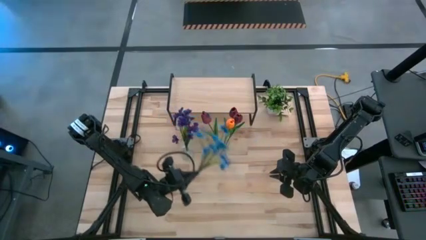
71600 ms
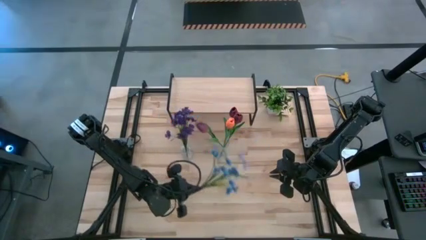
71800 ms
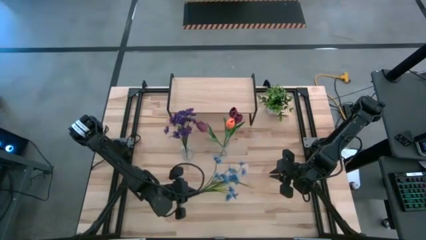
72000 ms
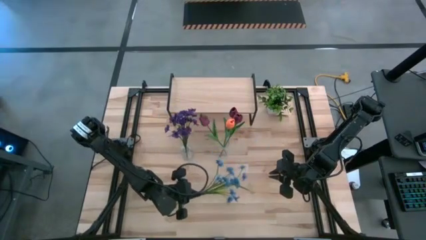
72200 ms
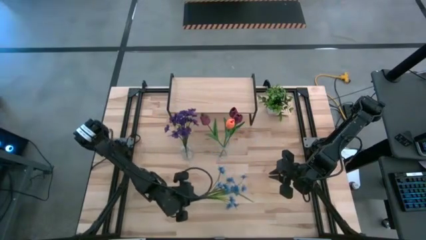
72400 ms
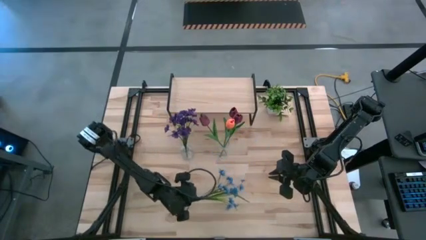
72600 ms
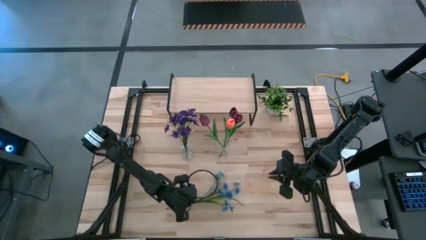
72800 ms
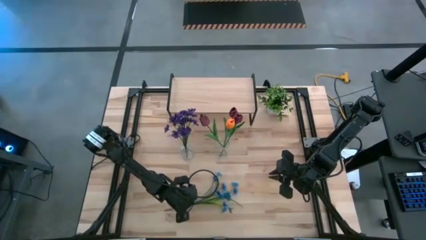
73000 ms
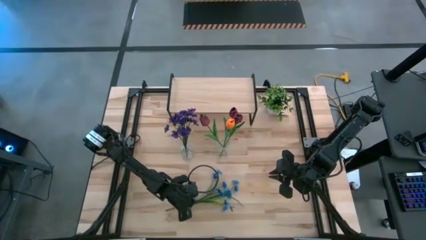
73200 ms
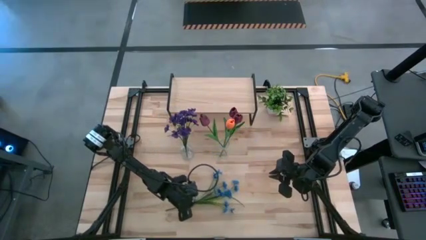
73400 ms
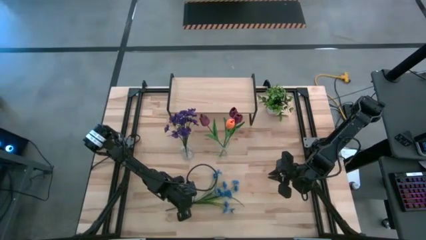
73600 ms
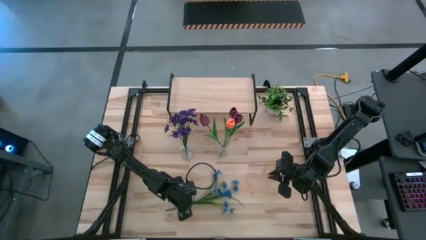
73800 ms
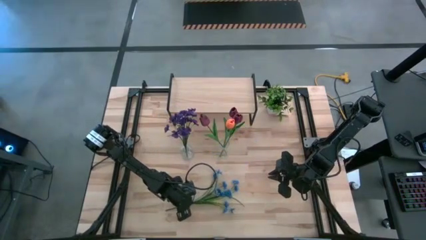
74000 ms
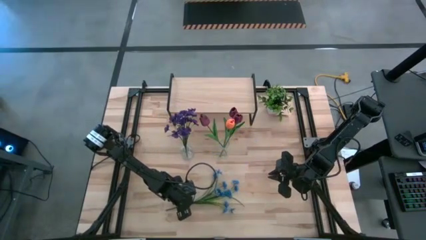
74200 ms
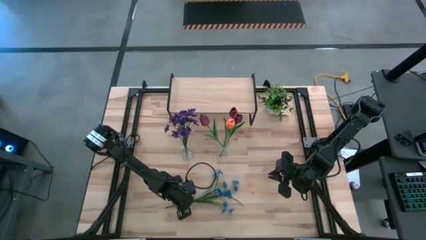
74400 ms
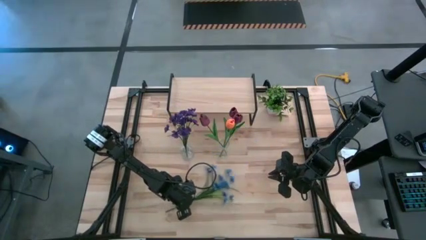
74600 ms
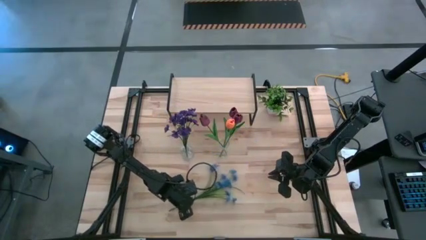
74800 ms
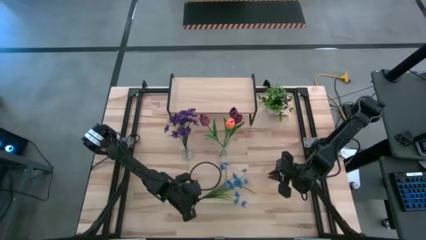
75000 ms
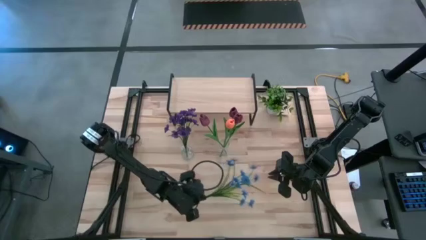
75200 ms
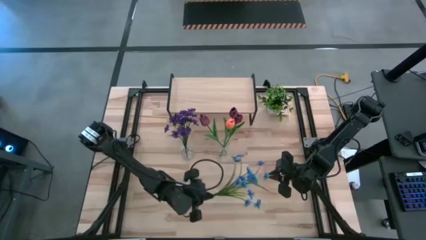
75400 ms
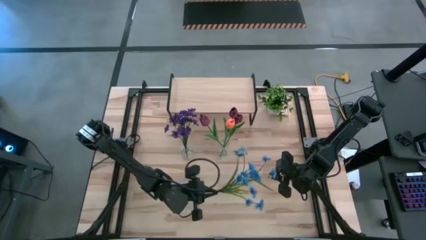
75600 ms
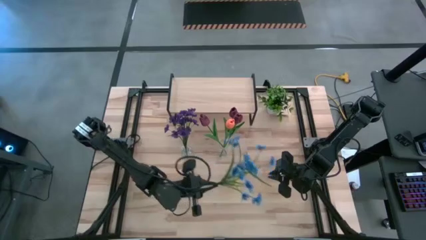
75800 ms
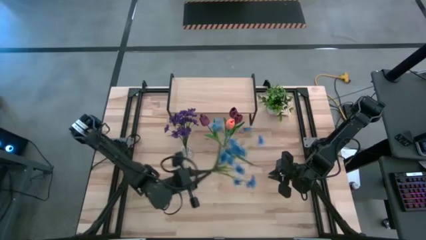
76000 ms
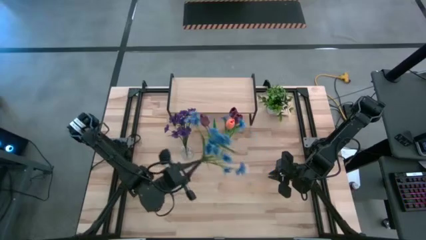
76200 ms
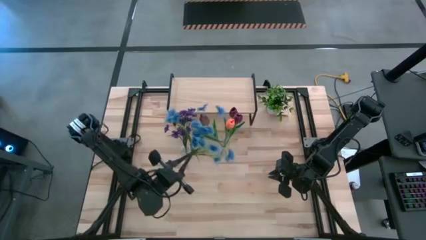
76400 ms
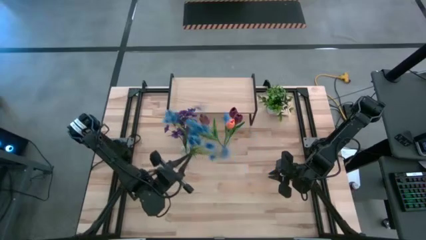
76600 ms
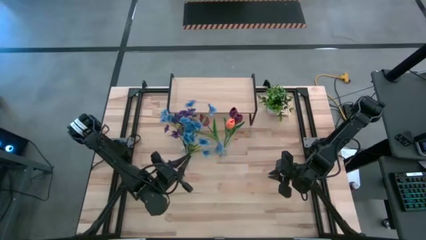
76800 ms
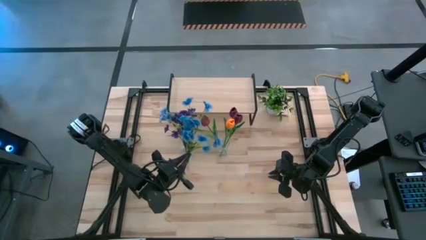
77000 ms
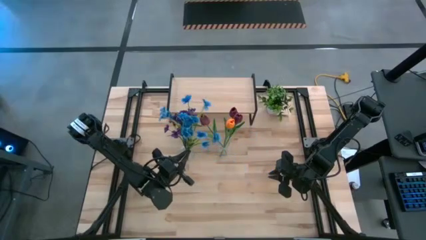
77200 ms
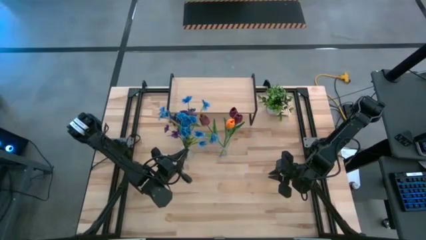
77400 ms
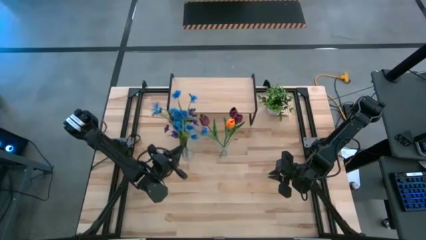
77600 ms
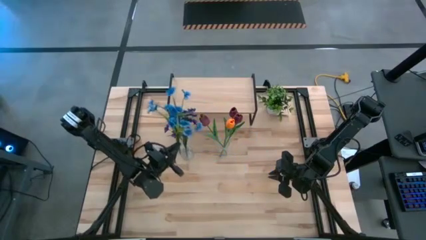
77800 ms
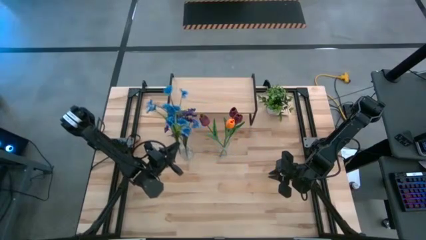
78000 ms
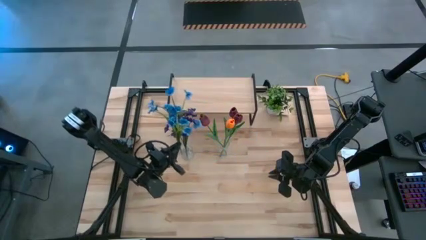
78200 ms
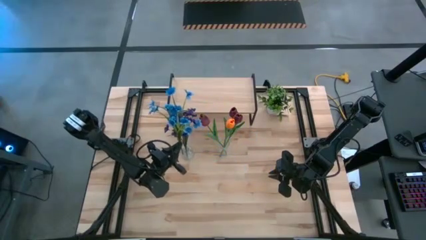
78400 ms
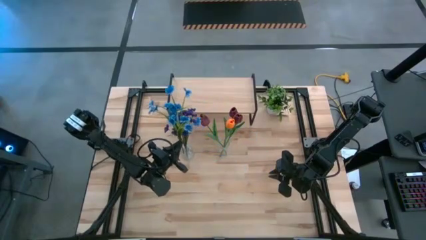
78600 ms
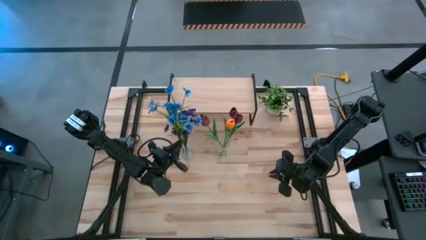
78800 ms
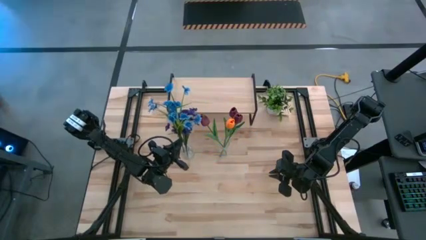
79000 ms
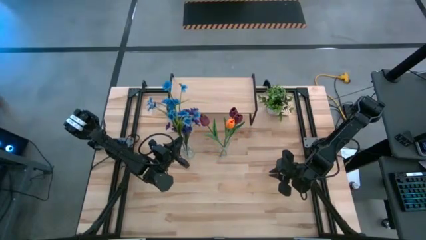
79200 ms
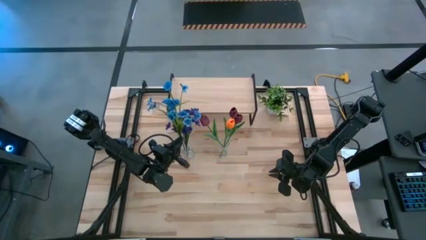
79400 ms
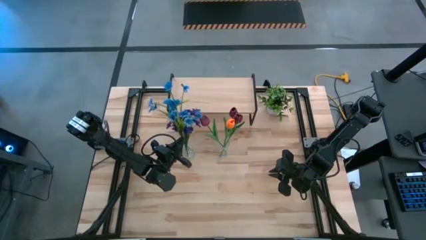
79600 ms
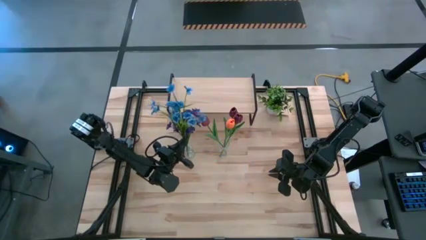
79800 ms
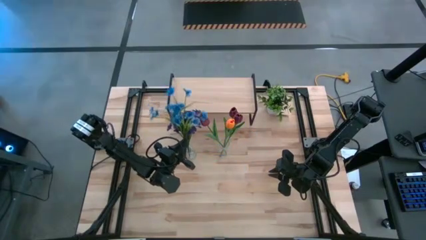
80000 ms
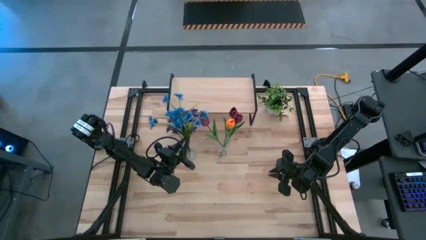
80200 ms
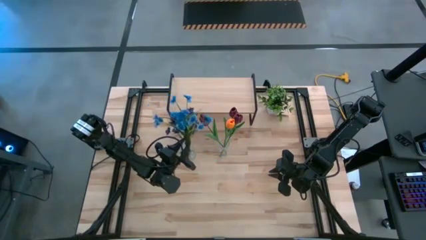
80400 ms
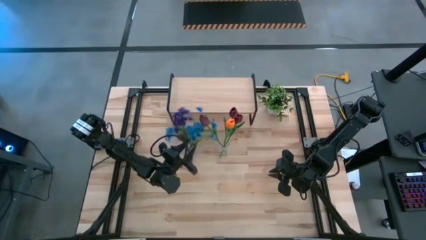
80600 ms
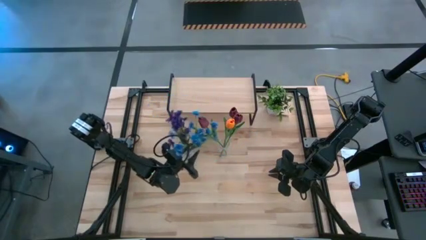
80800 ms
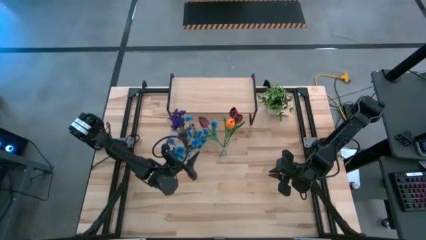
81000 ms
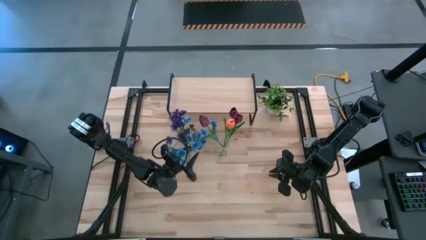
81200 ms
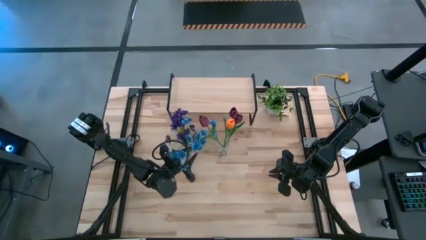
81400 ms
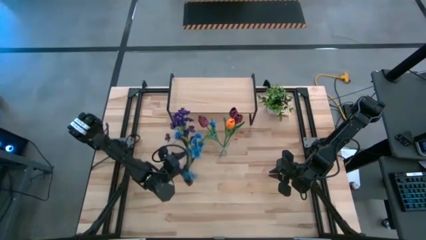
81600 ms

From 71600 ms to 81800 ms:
Task: Pick and place flowers into a vace then onto a shelf
Put the blue orchid into the left transparent vase

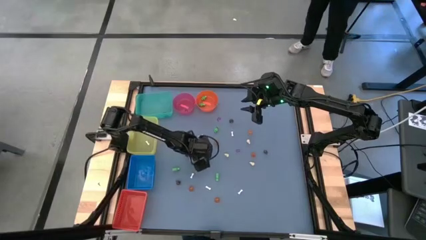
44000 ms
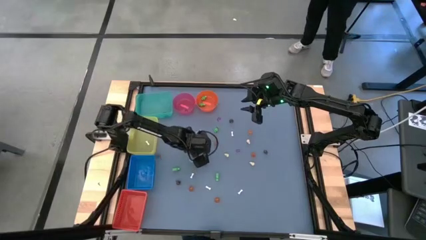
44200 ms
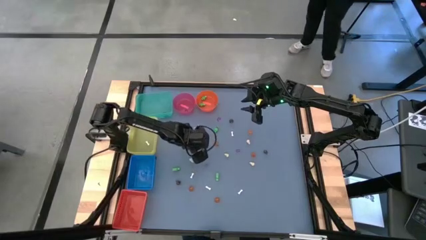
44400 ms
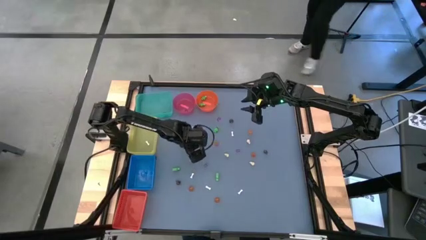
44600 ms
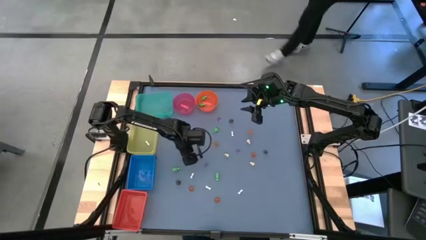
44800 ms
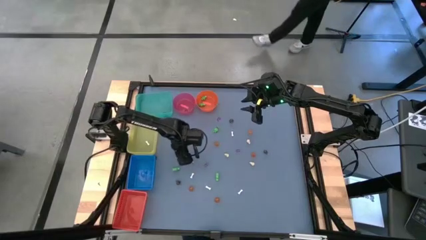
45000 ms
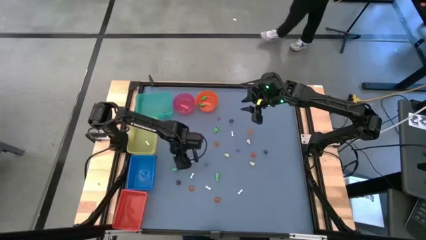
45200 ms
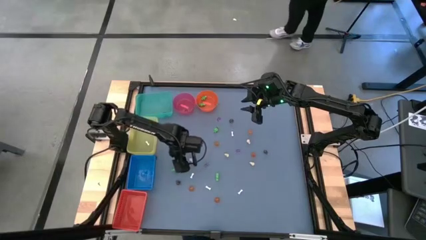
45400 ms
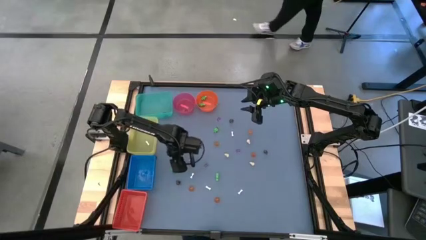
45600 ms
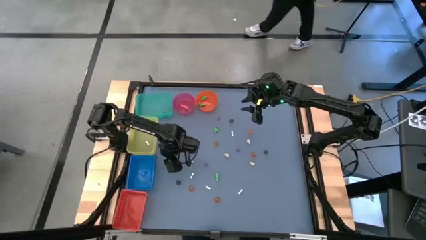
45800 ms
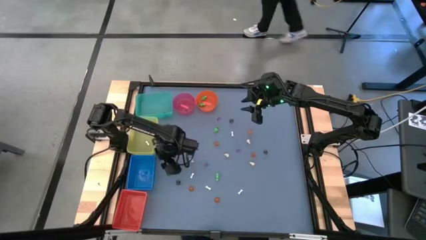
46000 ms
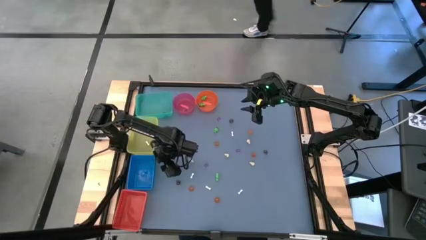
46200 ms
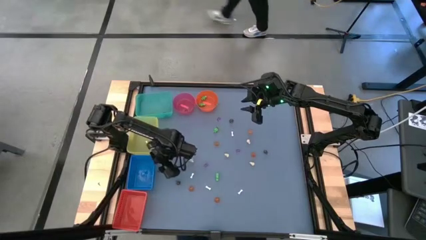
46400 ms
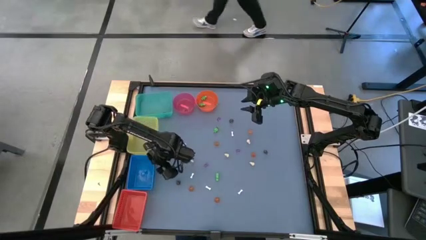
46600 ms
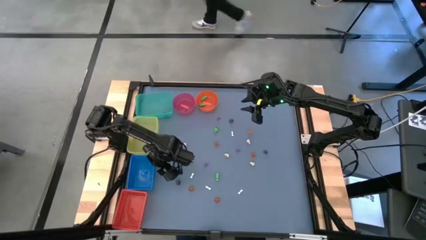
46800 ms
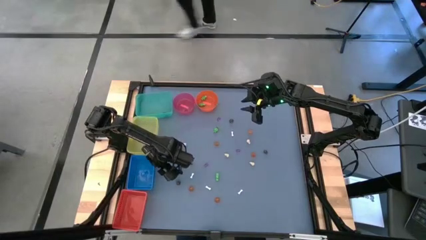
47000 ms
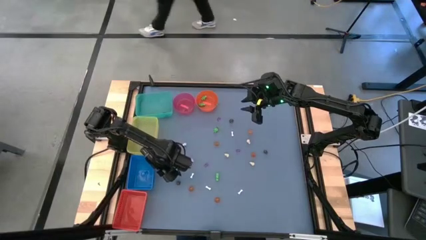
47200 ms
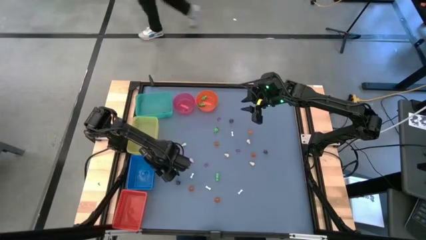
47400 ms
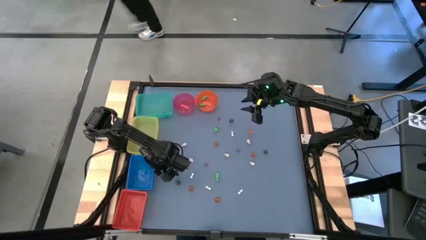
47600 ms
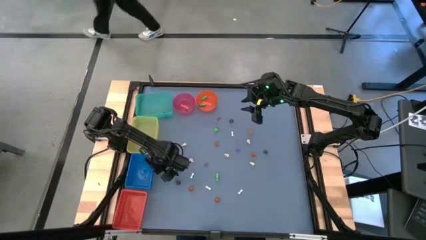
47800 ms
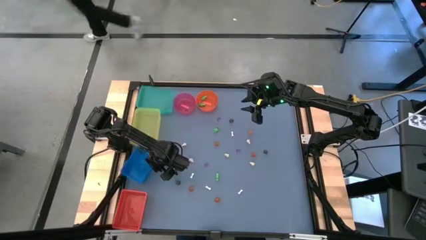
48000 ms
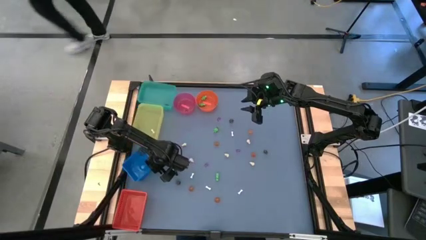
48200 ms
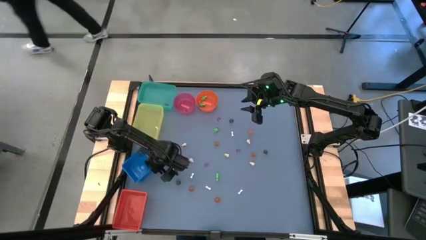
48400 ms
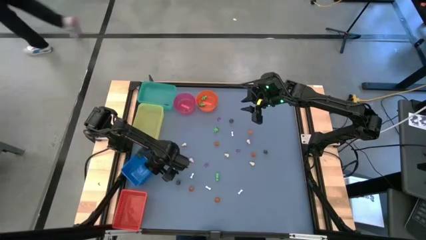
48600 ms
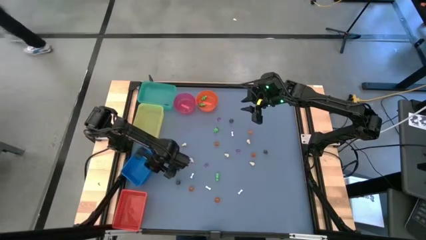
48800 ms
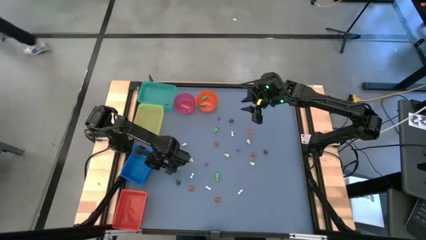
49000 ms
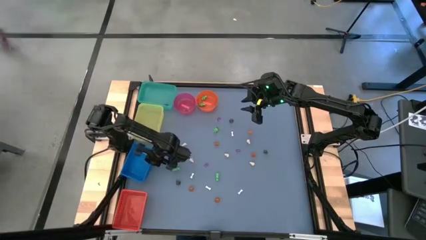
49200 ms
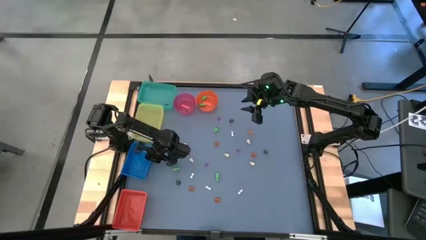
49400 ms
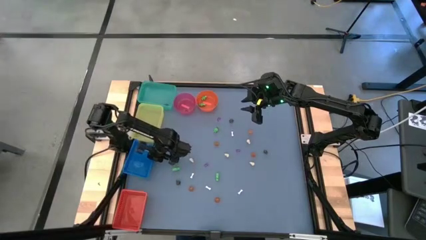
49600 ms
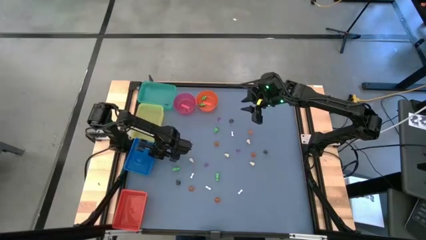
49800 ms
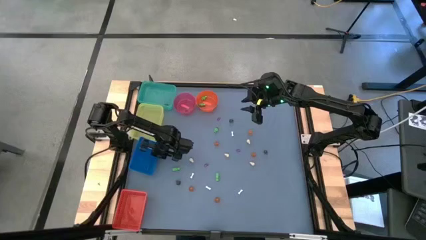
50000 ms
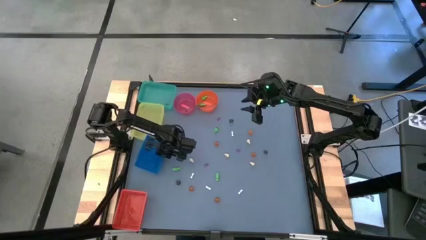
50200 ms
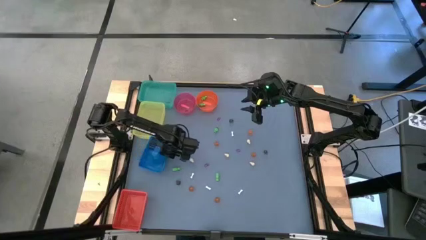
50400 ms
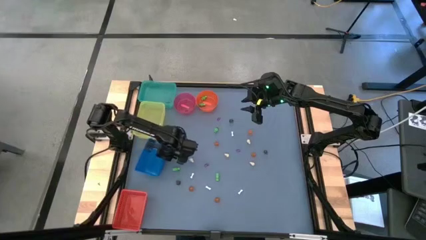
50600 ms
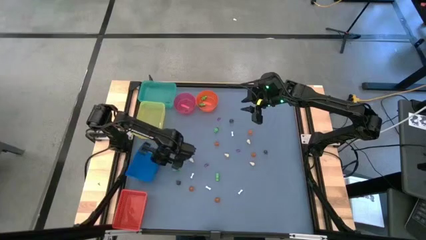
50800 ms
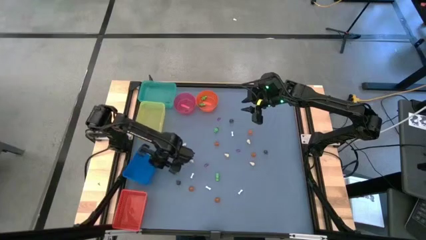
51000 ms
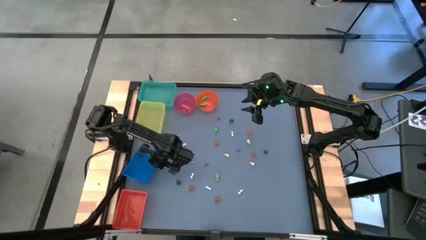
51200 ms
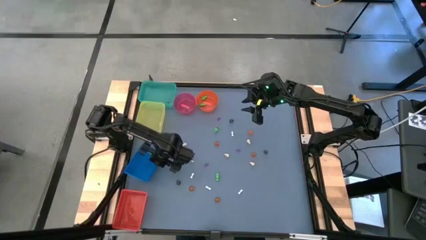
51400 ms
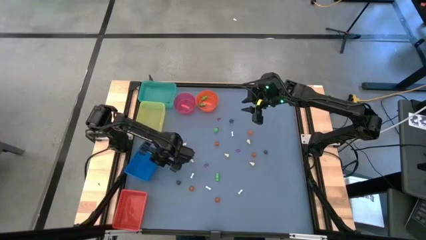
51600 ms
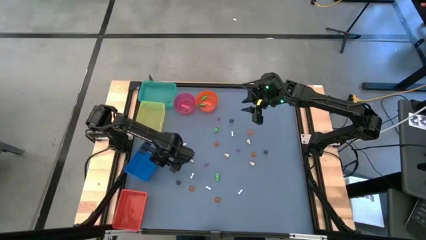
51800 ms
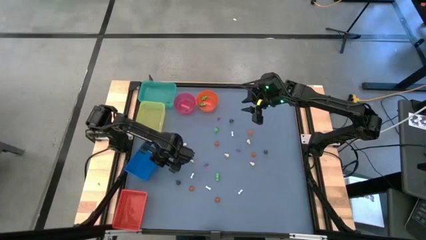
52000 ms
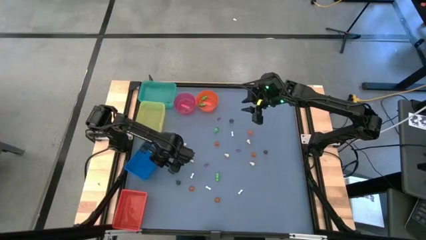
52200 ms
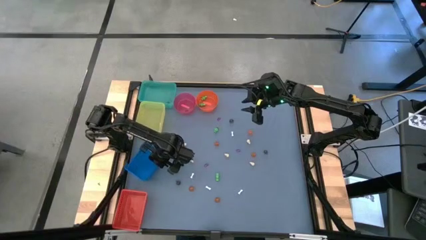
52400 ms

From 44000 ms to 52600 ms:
Task: Sort Halloween decoration
Adjust the blue bin on the table
